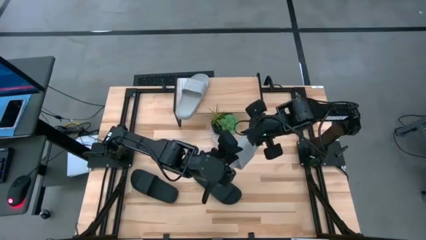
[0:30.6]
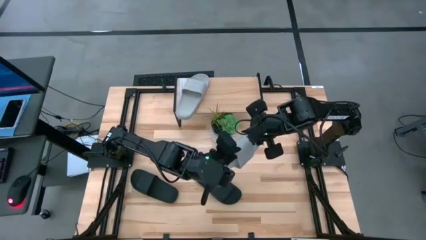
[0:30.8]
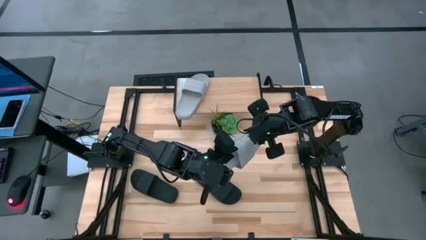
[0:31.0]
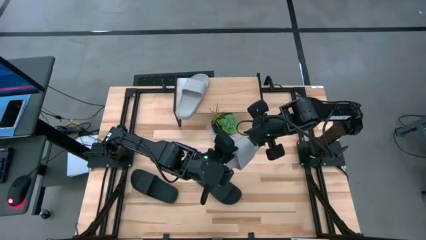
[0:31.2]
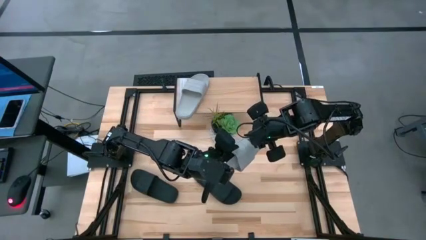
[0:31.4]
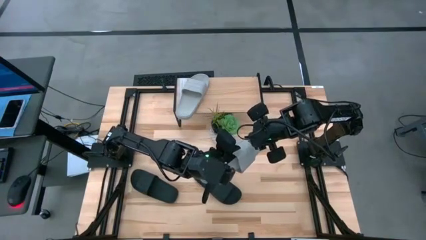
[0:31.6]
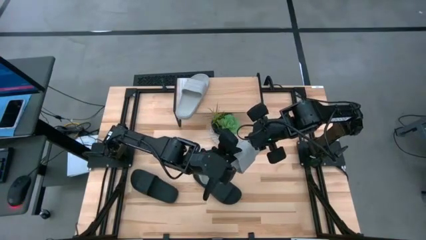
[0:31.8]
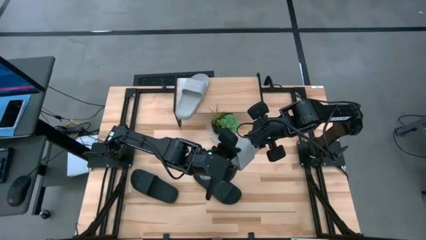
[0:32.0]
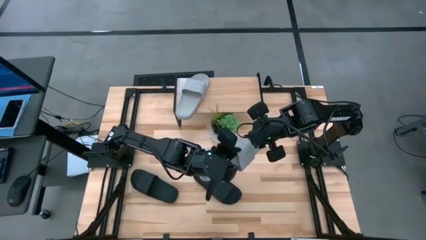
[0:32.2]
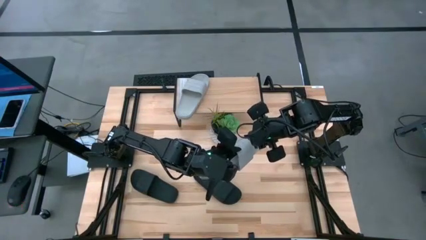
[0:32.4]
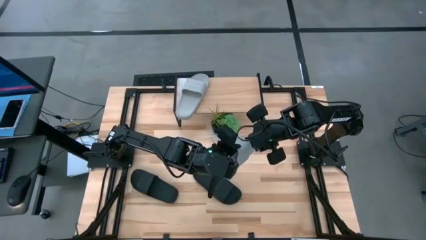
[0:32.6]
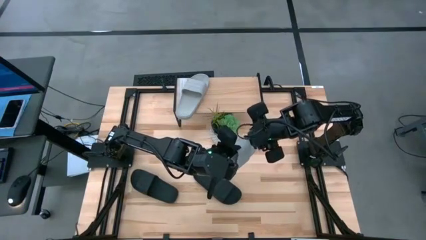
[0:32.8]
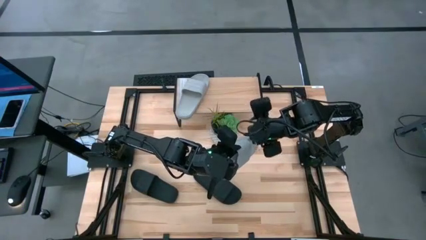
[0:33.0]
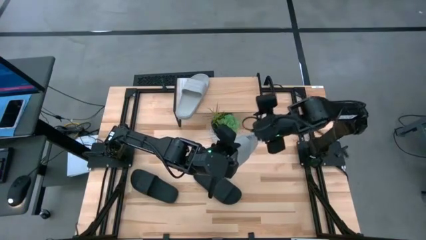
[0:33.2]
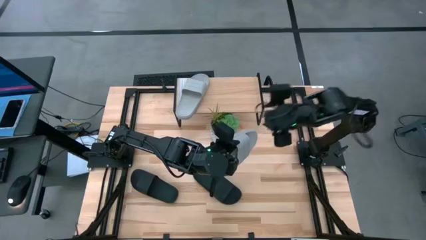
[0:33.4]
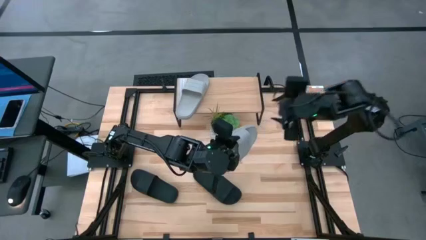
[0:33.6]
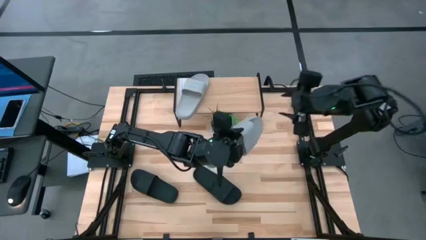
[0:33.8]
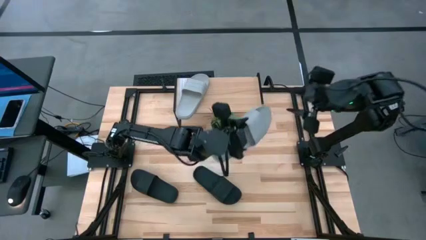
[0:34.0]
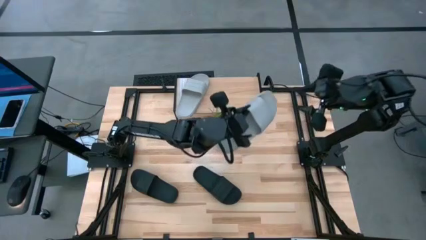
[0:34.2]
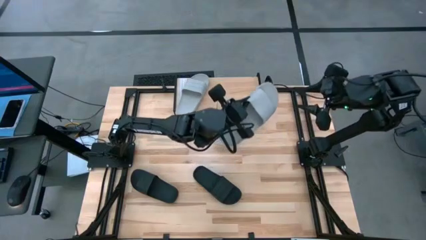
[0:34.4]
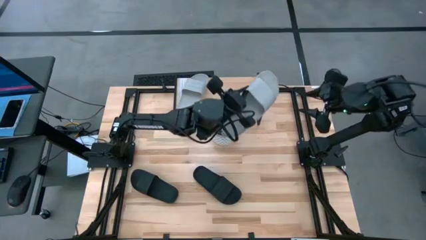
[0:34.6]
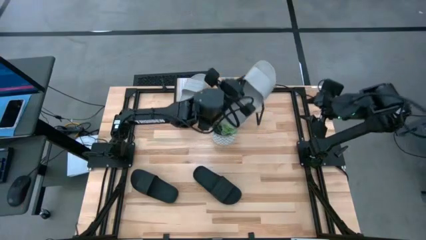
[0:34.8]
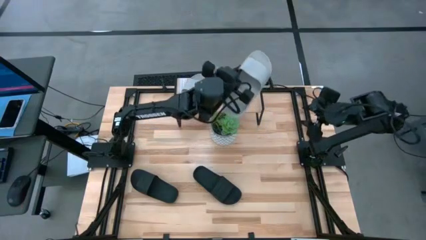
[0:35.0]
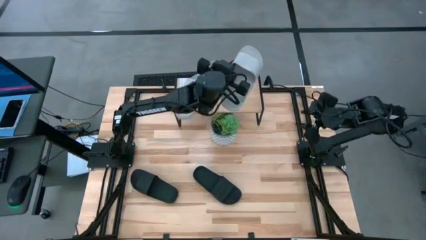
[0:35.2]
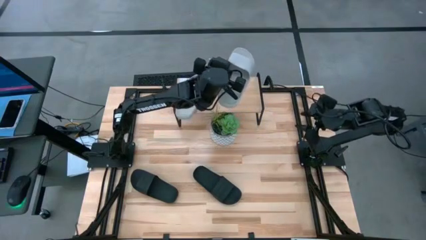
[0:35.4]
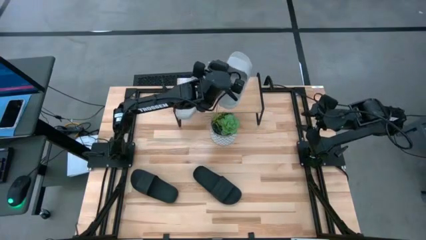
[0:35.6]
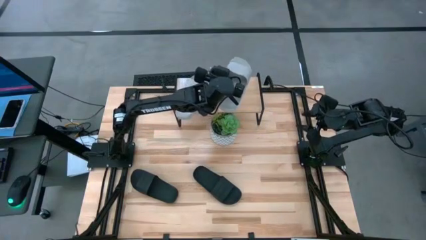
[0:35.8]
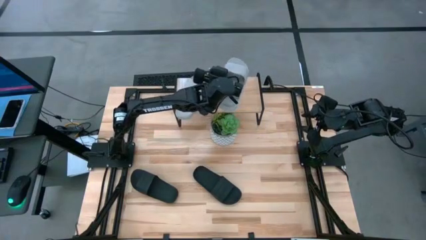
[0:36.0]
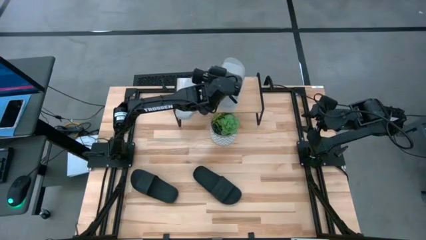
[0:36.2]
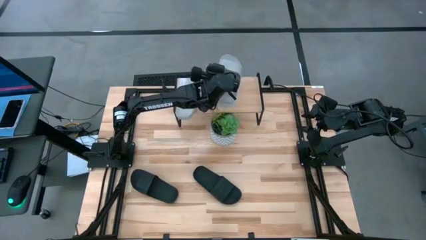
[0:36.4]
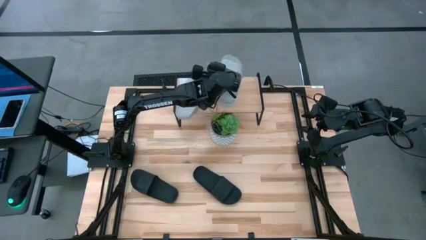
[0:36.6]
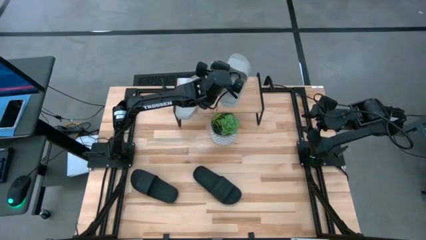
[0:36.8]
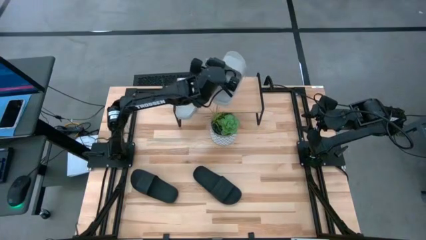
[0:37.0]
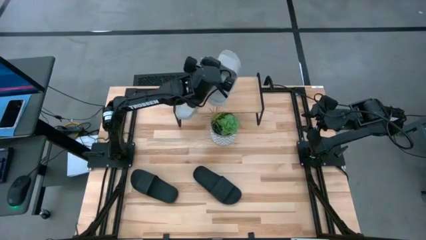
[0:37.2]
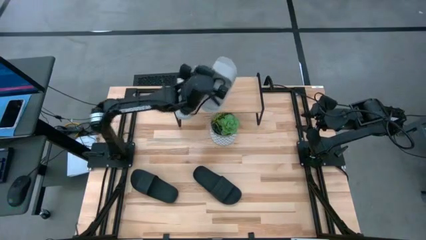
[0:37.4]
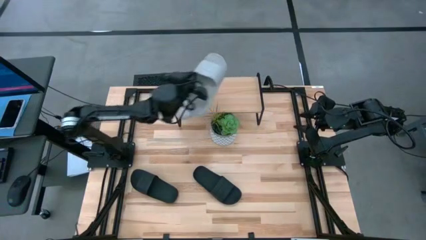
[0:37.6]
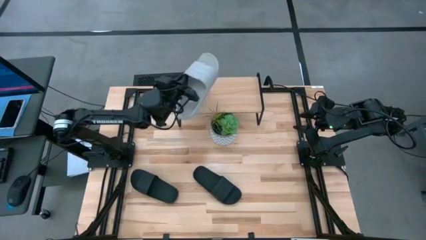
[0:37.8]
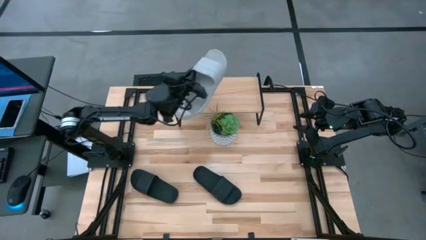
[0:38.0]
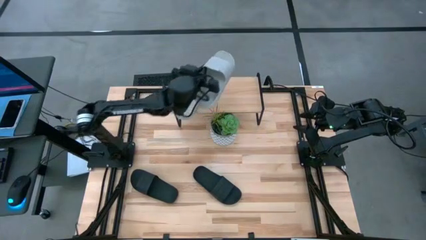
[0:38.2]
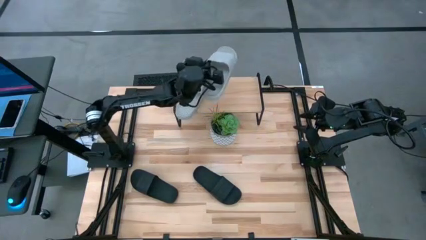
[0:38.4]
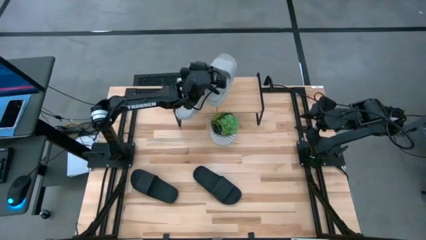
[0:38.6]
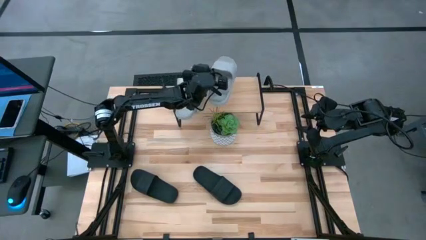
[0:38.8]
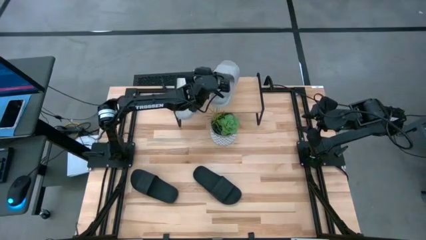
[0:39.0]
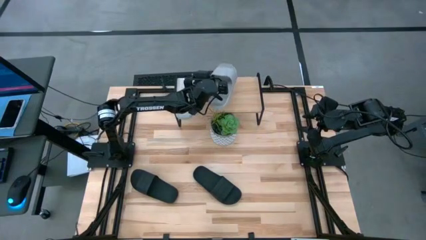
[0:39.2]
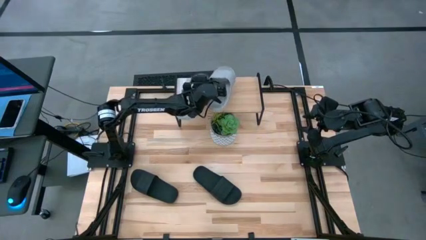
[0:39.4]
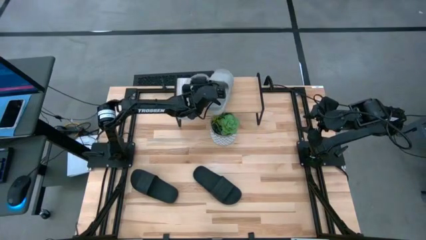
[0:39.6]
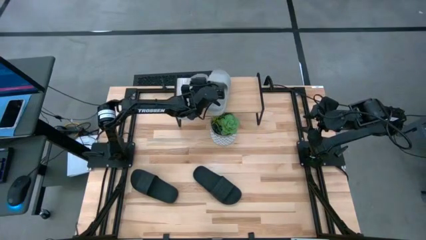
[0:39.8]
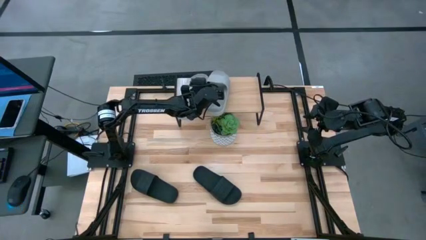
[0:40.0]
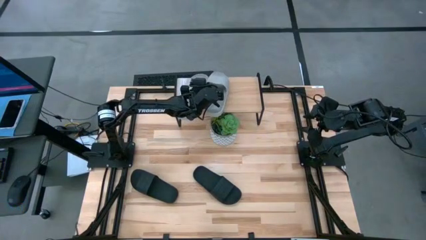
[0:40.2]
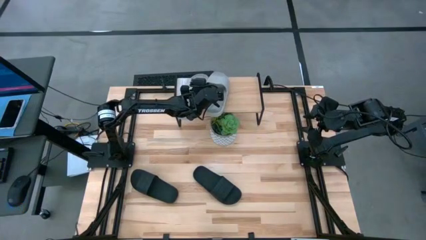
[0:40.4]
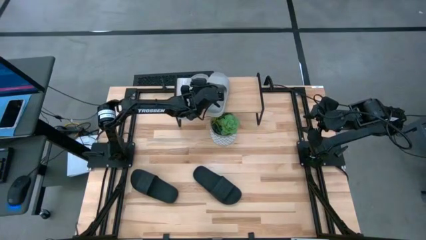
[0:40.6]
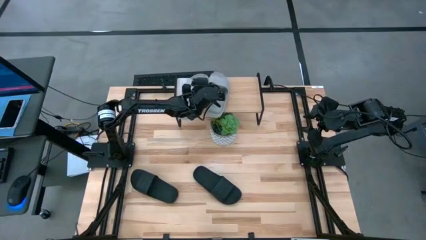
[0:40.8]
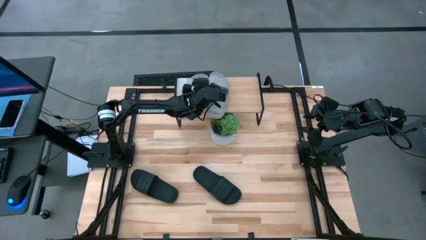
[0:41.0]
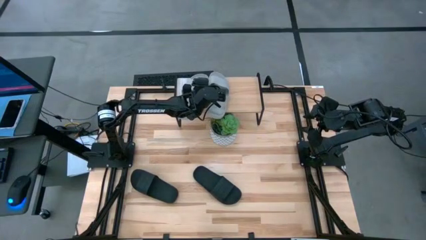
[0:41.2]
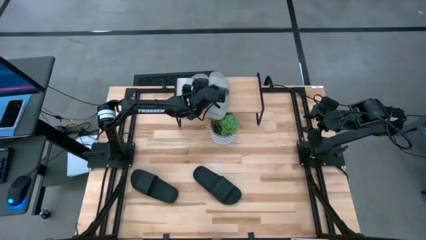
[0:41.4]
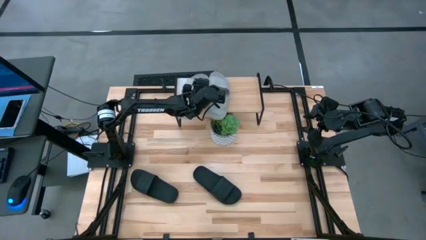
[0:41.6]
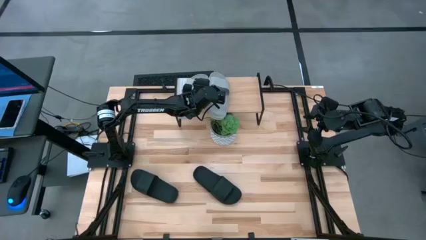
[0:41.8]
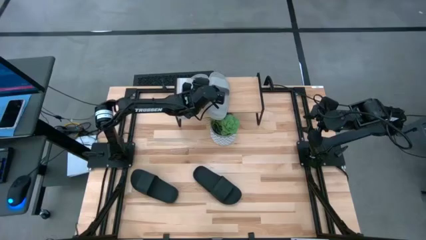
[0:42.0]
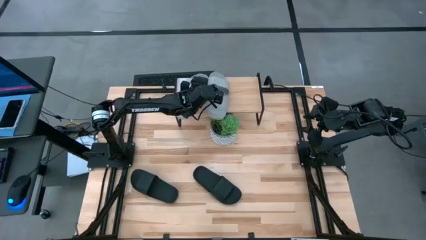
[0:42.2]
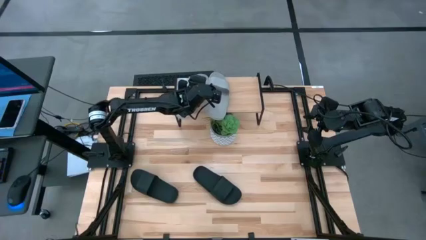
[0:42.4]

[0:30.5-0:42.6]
Task: Pick and place slides into the shelf
Put the gray slide on the shelf

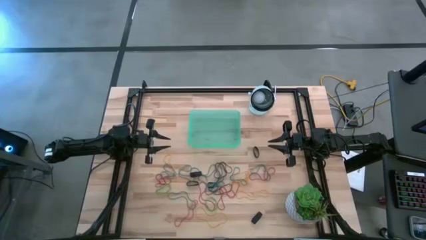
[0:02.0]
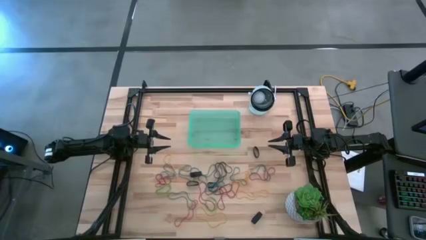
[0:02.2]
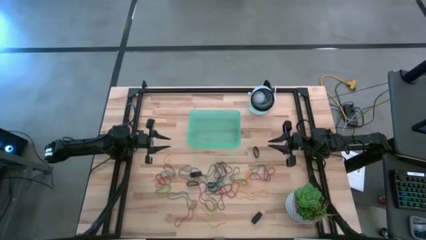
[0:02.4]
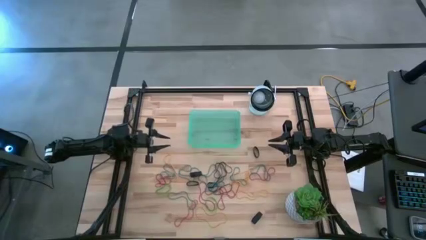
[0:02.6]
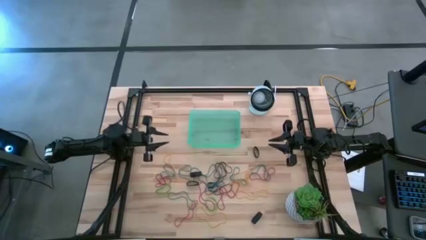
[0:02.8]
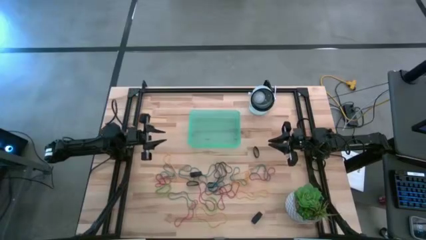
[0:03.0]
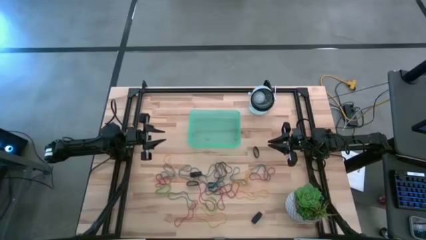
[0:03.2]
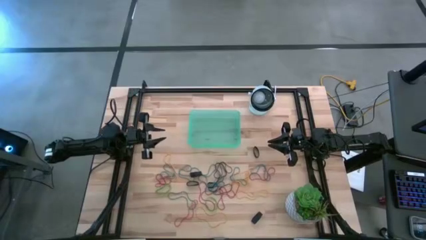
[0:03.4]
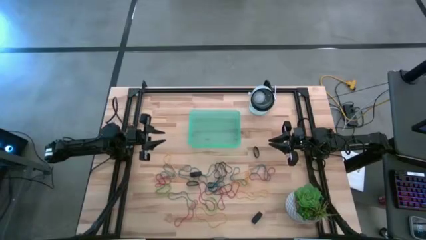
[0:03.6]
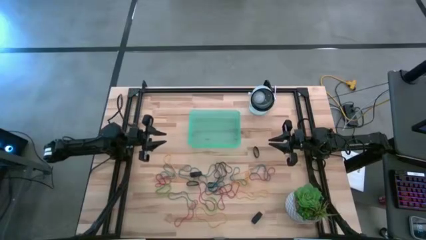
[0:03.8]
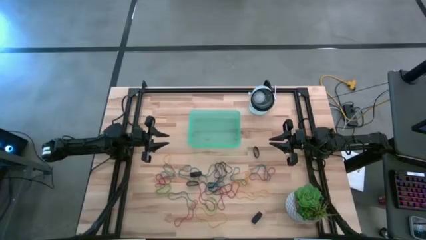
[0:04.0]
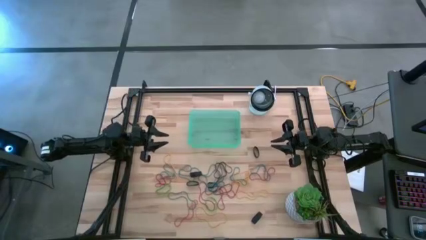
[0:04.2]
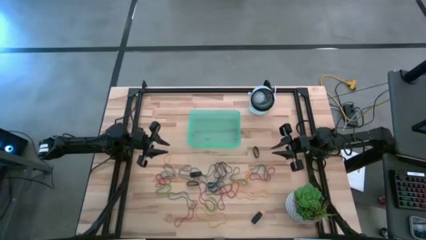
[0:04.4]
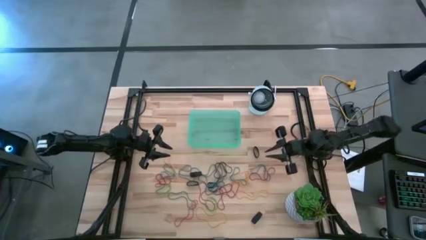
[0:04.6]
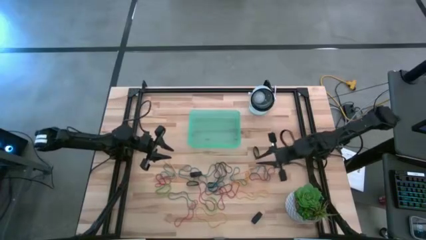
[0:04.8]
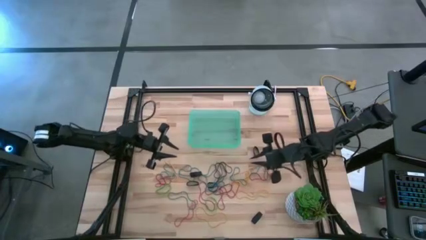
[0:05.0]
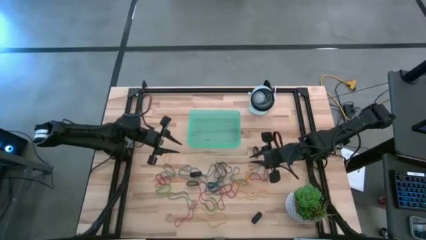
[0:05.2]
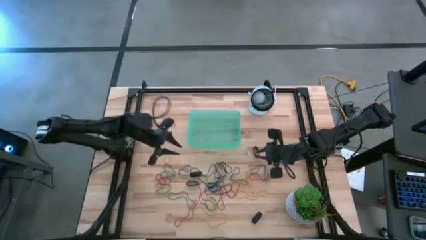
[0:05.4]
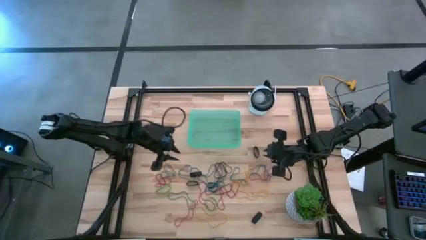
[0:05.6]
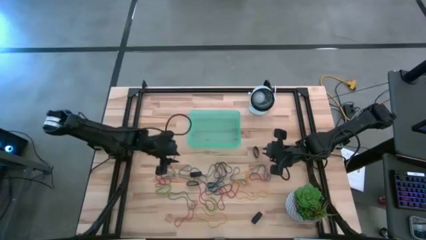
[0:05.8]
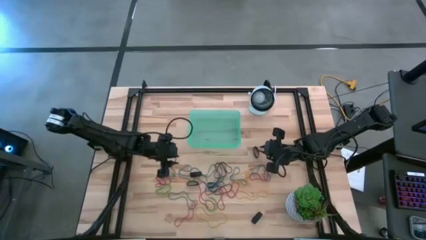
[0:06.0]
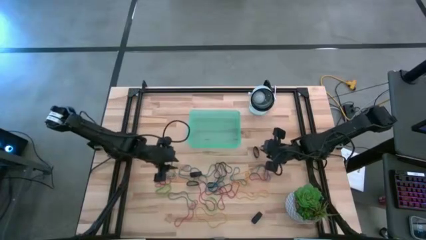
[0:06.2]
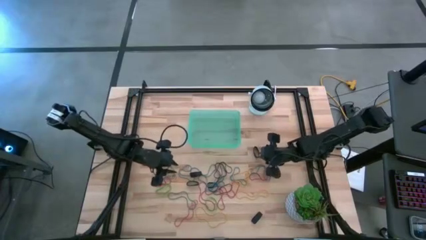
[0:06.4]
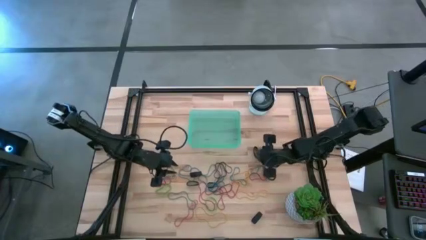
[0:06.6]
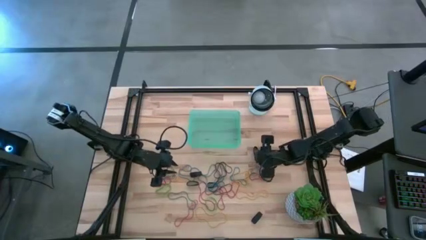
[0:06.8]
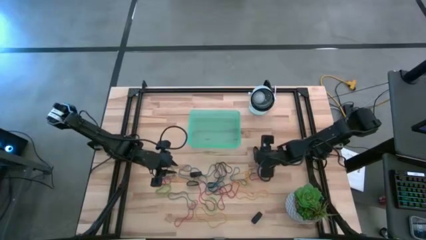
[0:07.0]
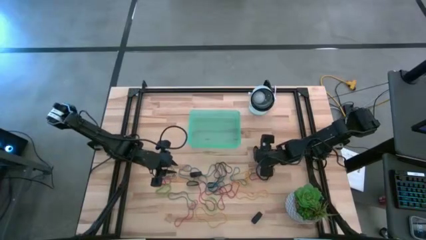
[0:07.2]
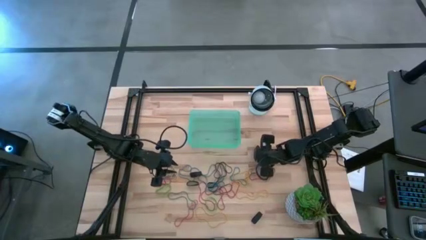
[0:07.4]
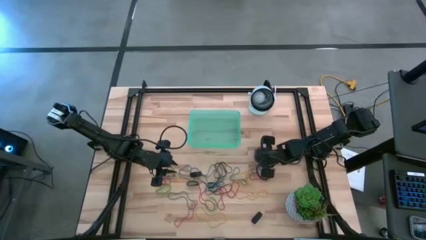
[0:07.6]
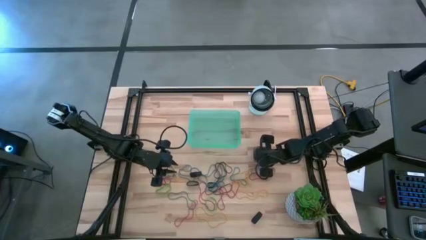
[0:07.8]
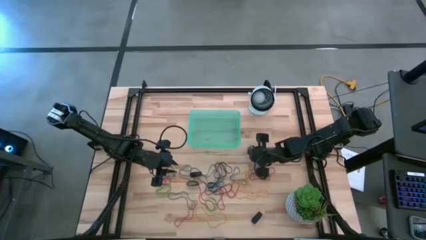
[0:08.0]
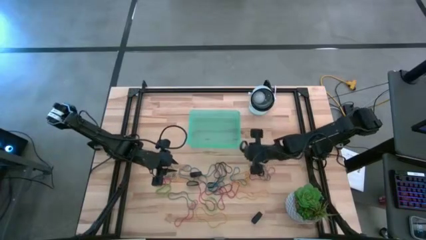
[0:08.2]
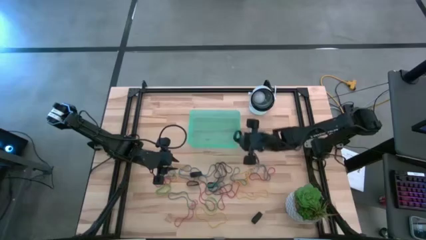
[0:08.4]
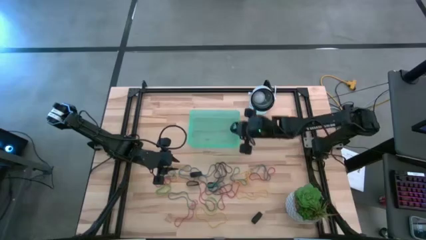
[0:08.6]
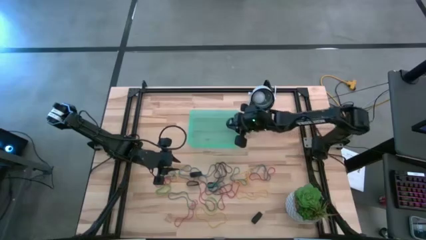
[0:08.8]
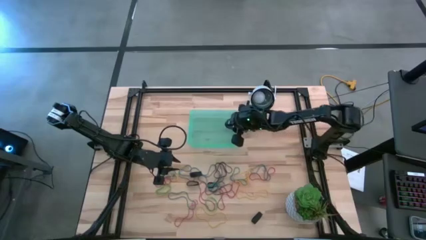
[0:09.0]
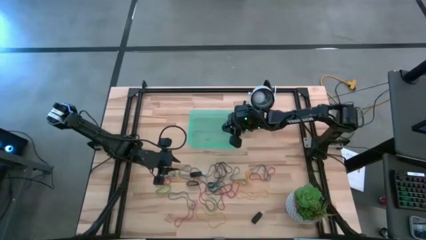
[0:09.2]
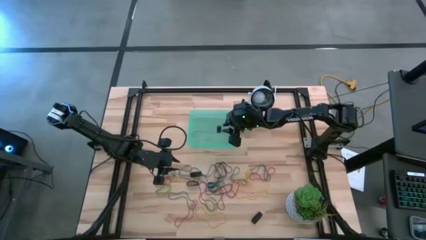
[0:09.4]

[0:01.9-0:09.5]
Task: Pick and place rubber bands into bin
Put the black rubber band into the green bin
